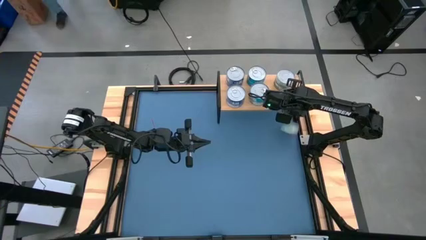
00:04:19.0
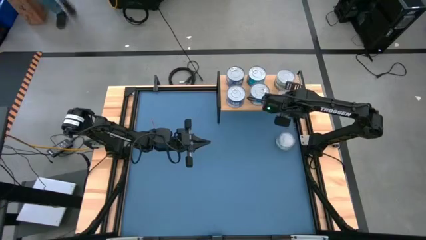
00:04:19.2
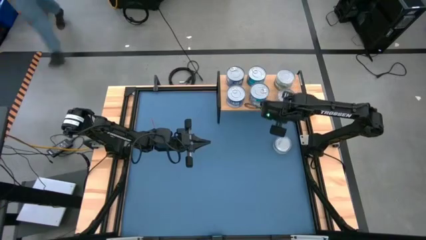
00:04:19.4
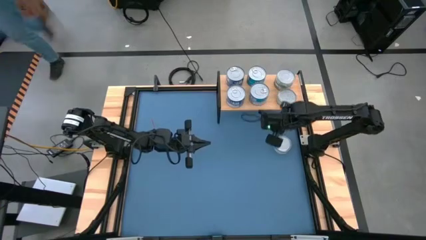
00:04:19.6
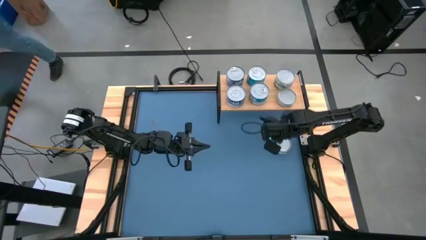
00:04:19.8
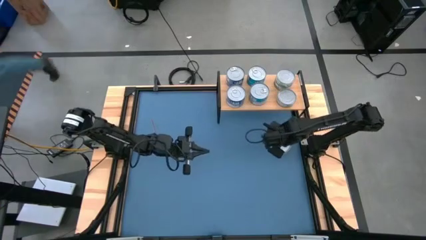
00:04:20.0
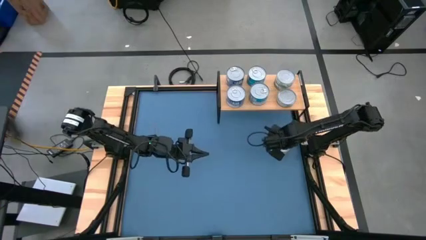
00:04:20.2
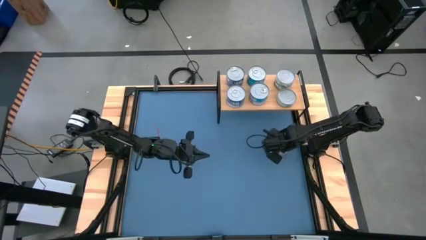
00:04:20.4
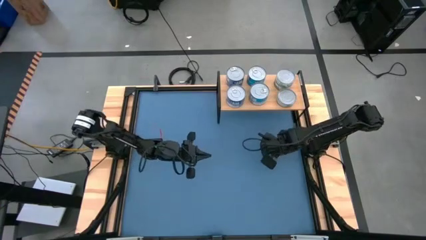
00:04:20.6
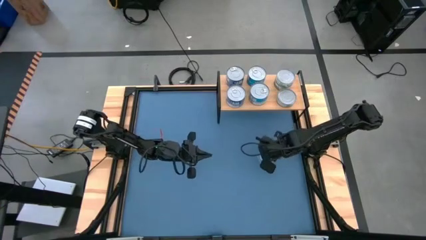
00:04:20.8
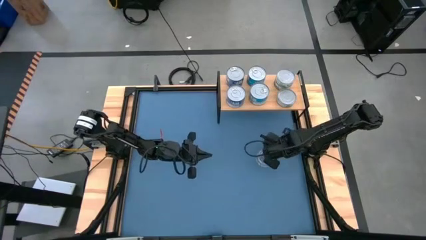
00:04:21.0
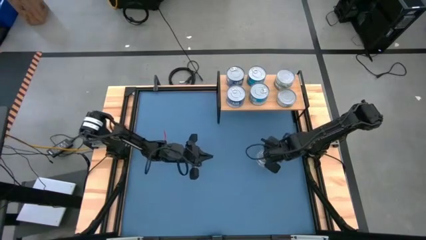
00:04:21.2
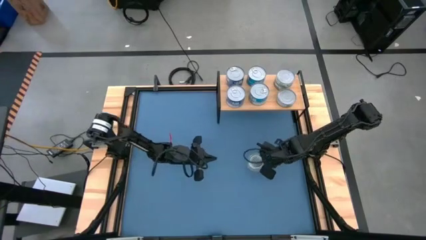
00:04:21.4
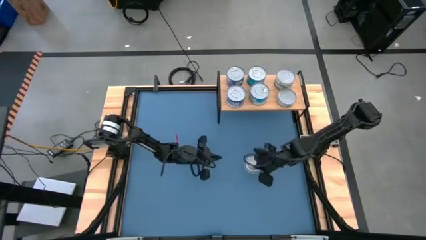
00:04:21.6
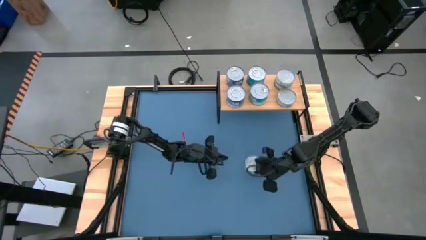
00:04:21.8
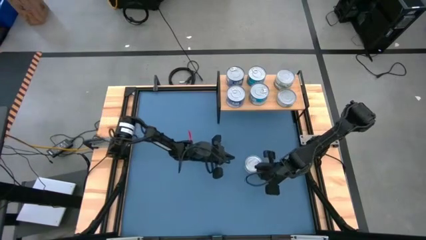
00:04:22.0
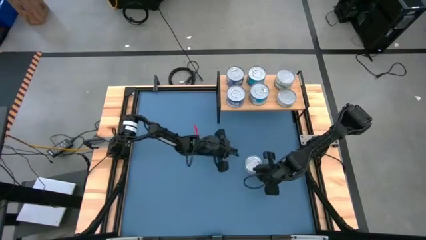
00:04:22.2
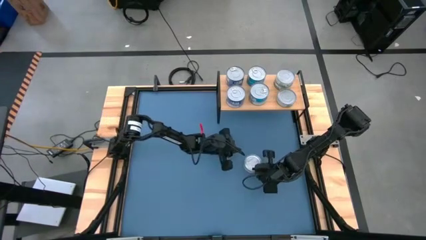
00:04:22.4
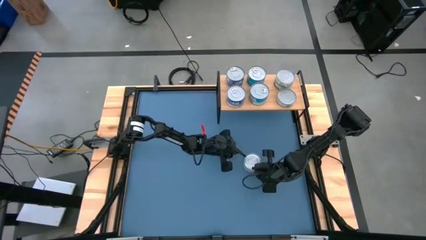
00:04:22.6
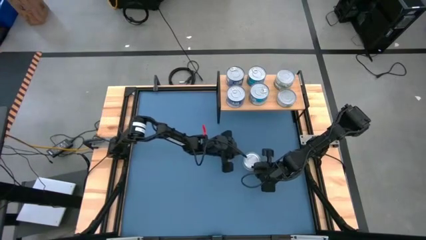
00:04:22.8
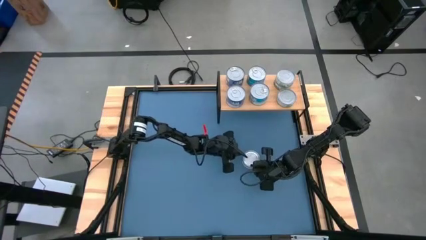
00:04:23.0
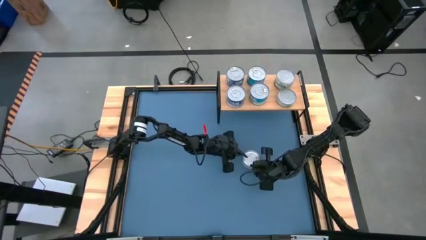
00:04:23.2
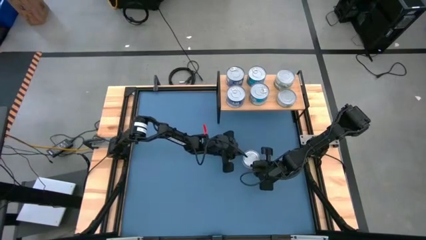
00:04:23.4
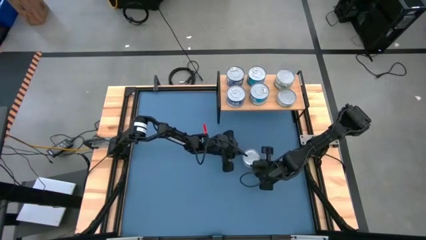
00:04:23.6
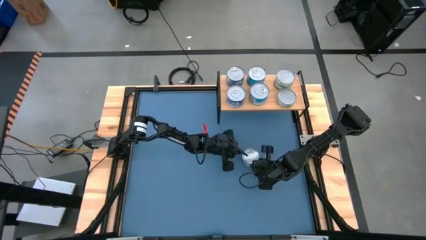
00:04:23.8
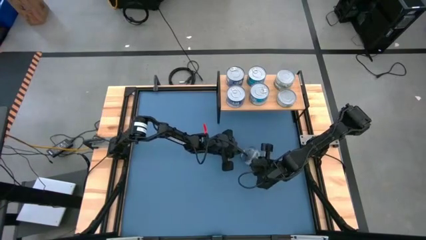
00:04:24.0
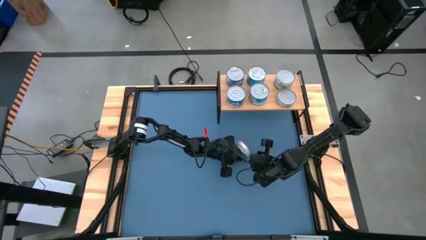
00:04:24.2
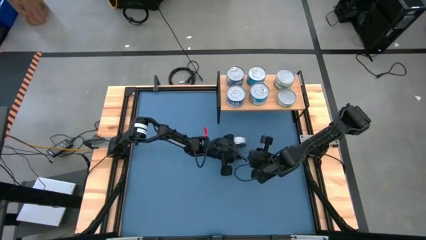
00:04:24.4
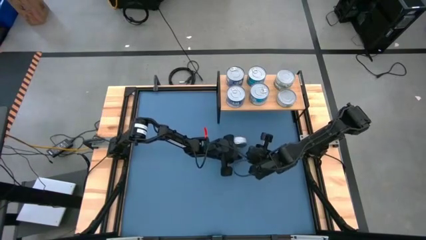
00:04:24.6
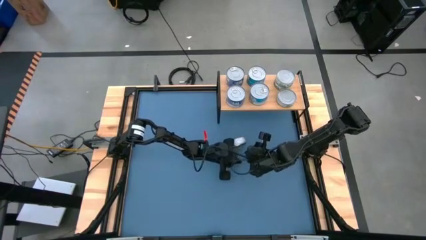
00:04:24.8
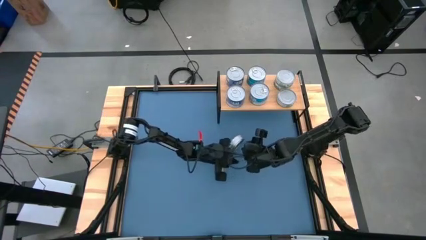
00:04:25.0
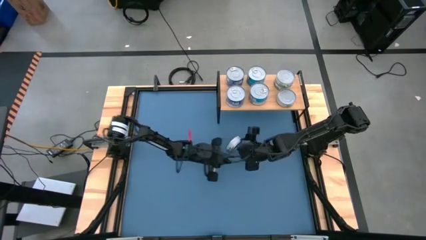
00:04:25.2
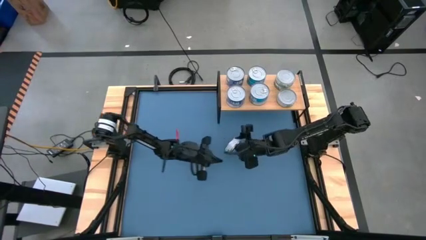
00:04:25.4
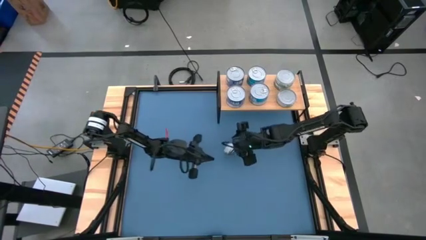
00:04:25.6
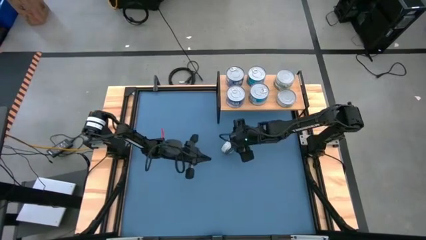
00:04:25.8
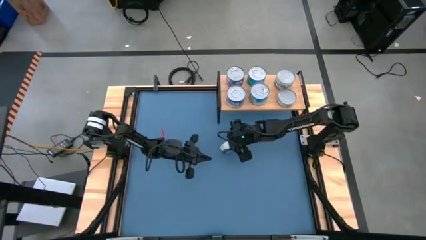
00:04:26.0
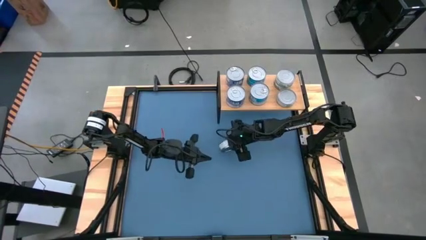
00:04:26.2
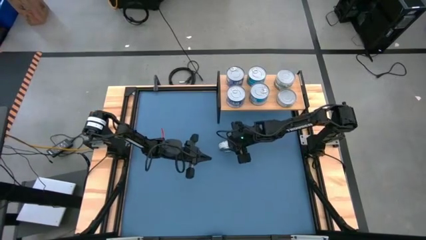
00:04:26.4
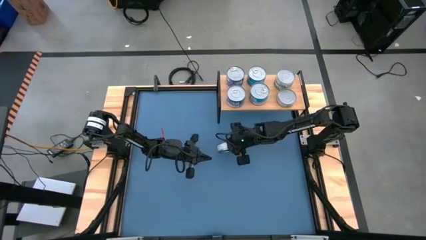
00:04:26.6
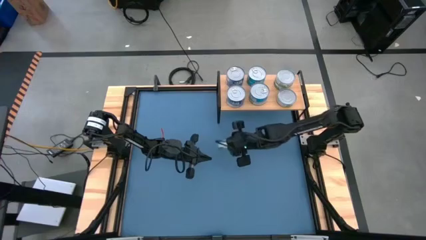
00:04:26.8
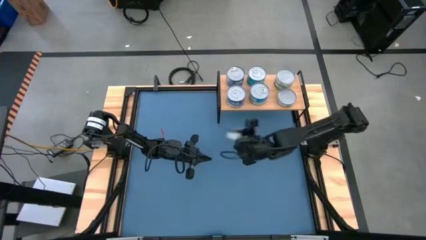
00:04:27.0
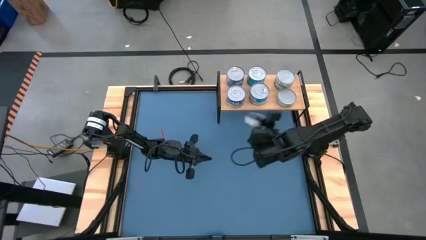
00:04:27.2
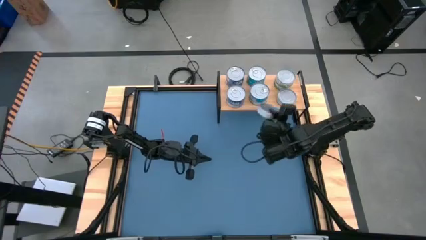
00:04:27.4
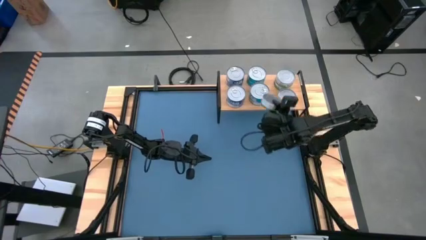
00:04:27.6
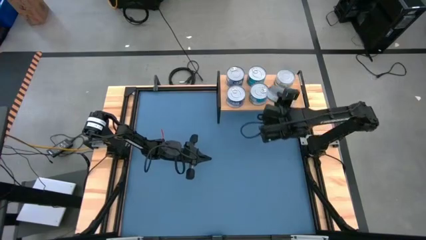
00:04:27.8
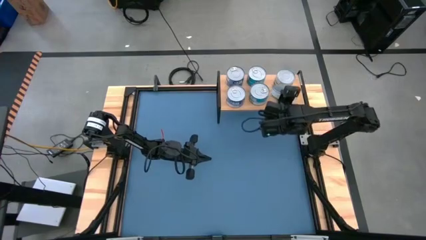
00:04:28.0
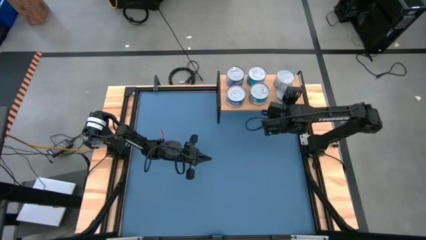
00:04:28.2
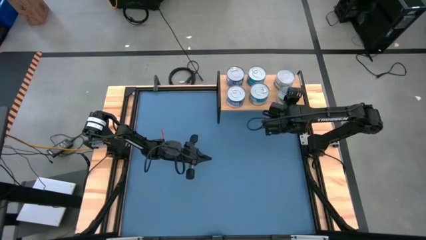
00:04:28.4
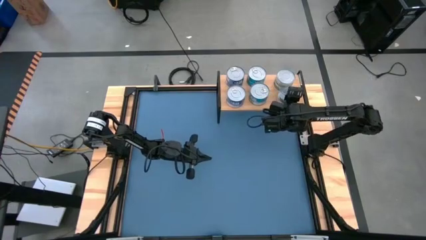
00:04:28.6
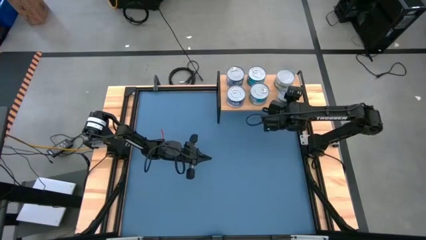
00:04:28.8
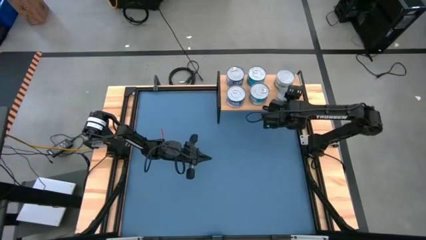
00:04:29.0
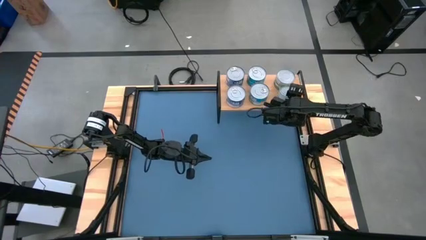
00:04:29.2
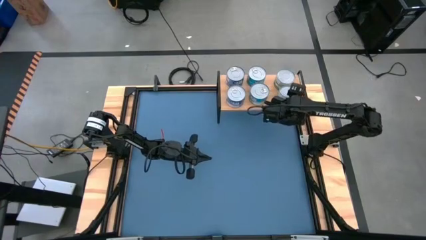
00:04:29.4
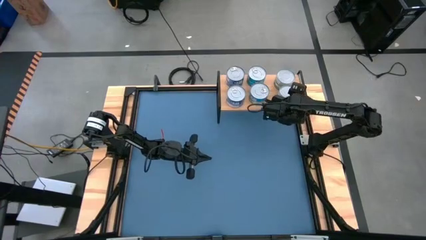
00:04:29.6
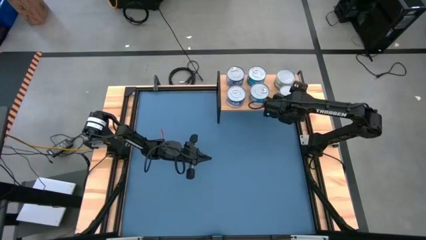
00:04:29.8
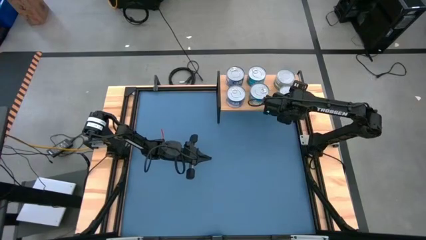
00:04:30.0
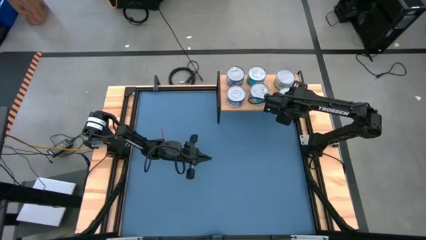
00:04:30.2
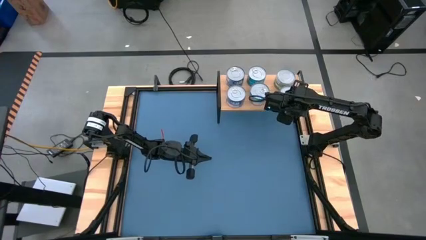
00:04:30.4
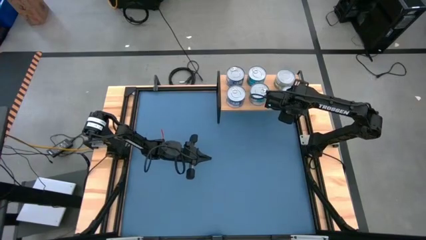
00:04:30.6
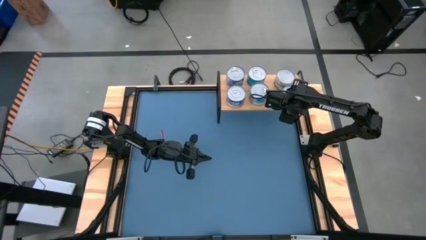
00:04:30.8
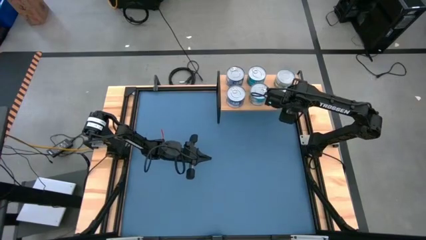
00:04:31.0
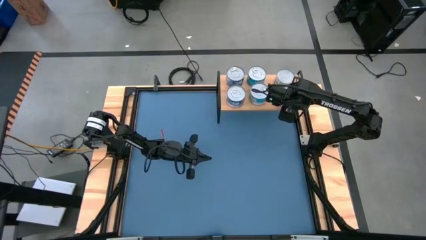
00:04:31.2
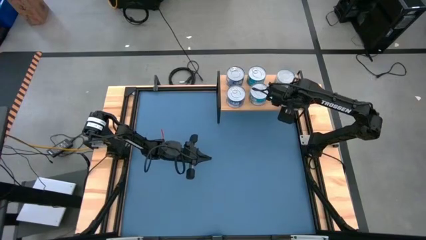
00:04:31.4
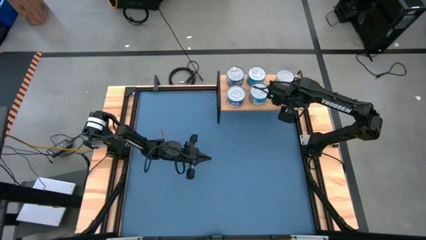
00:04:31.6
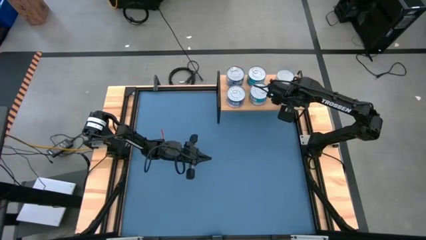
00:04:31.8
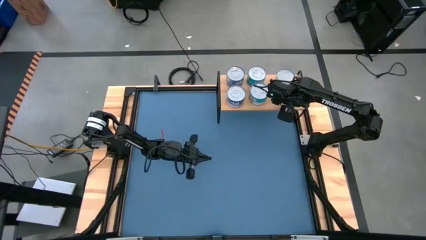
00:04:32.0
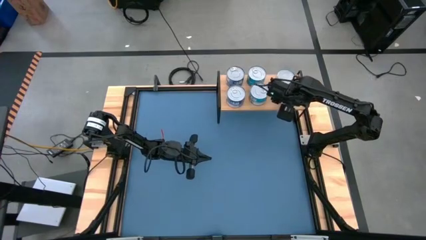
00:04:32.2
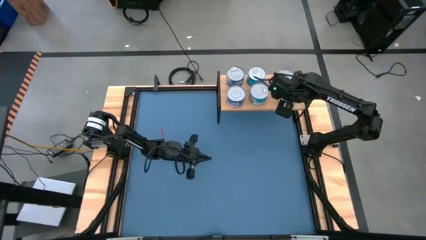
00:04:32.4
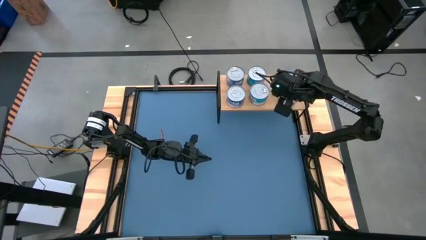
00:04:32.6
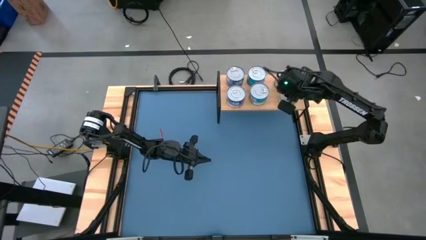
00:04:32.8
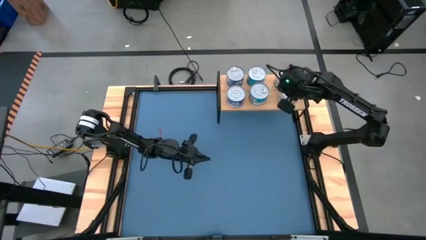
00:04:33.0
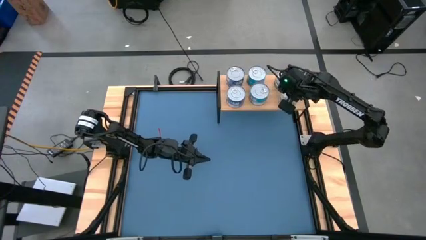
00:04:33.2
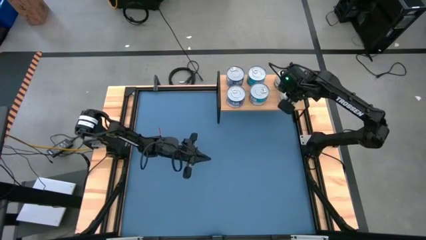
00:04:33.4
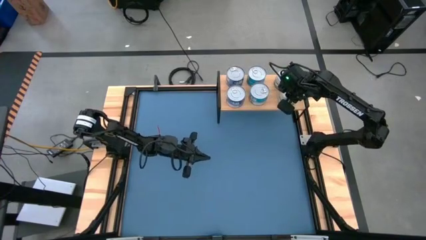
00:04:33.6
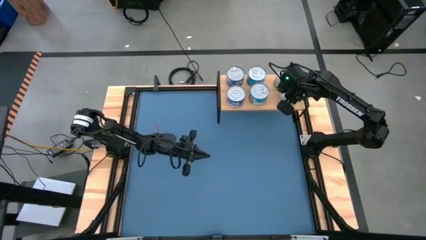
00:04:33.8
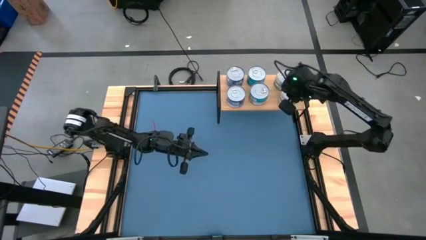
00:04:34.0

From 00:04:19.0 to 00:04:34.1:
Task: Stack canned seafood by type on shelf
Stack the green tuna can on top of the green tuna can on the shelf

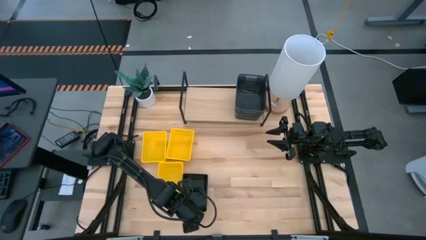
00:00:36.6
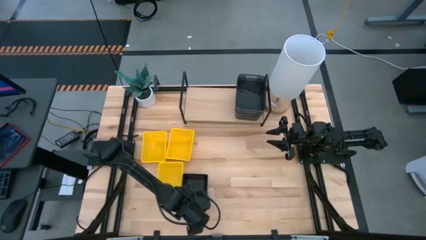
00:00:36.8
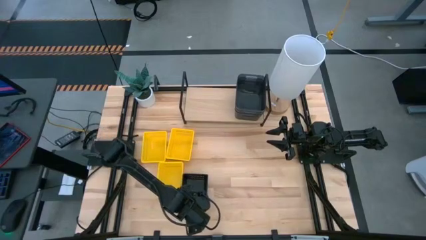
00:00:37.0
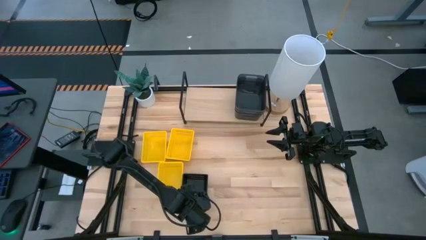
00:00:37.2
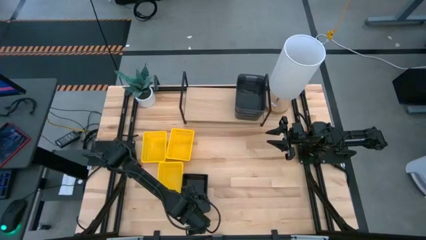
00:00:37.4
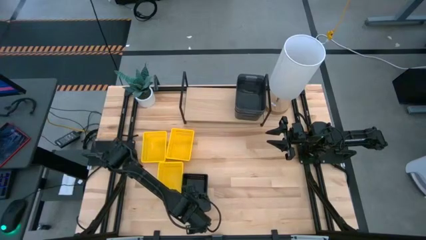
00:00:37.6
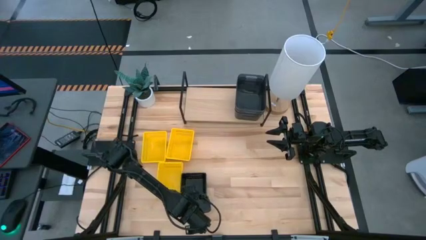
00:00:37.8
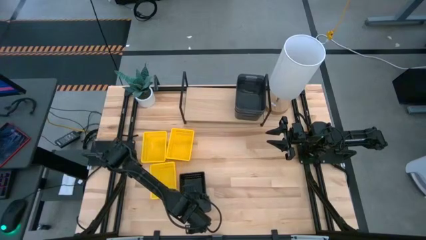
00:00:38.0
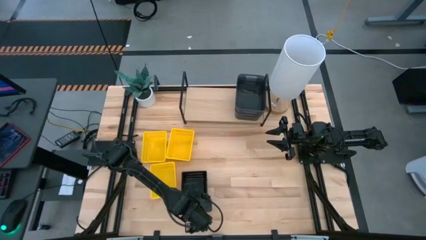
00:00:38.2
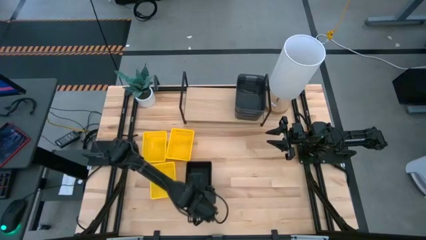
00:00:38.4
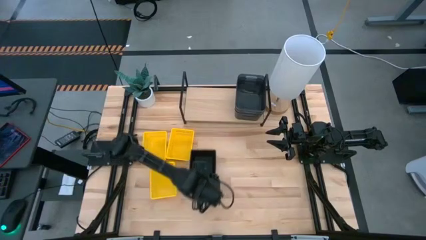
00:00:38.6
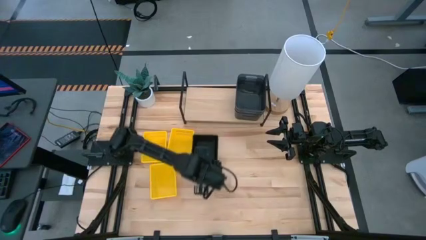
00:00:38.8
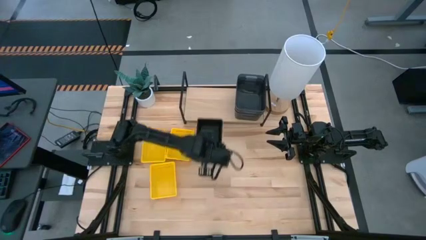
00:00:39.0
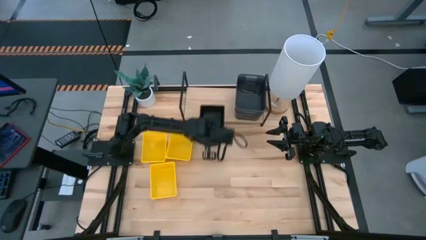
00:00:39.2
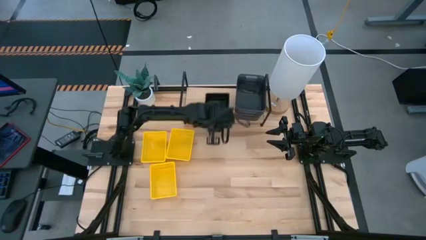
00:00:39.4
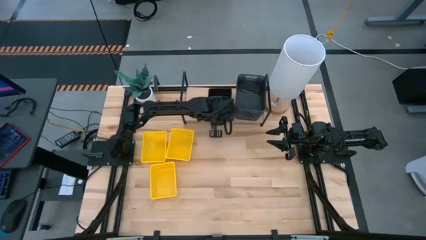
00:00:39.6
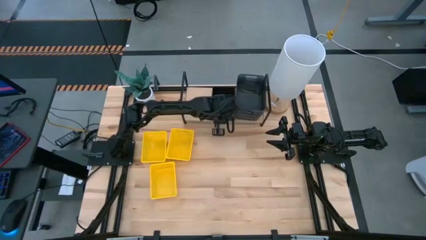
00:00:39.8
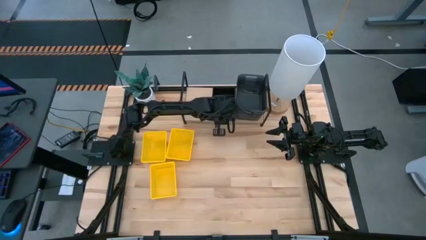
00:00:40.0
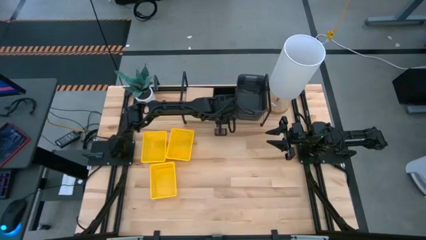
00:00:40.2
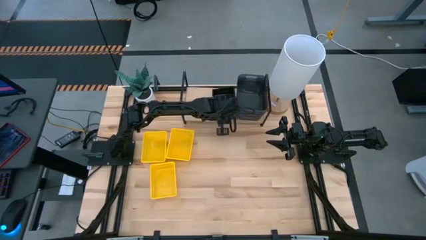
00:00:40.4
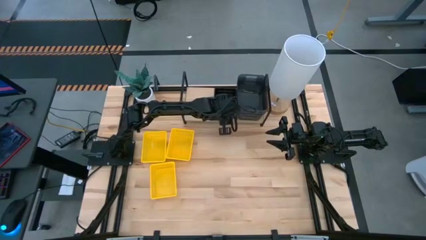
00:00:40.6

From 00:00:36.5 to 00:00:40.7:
Task: Stack baskets on shelf by color
Put the stacked black baskets on the shelf
